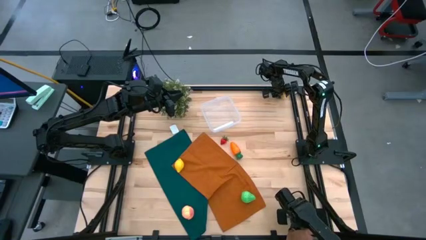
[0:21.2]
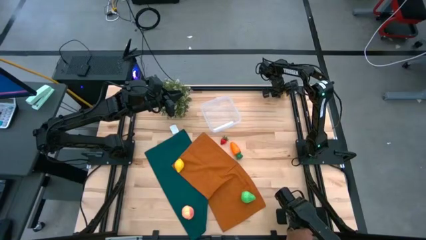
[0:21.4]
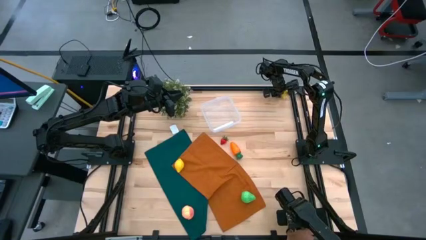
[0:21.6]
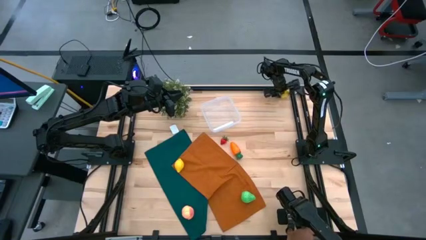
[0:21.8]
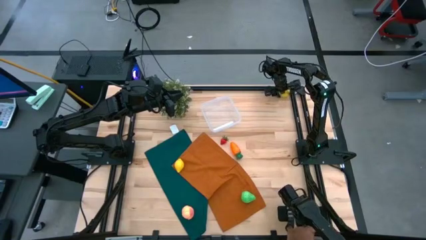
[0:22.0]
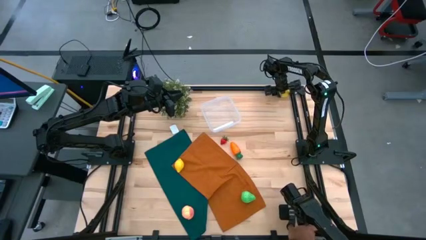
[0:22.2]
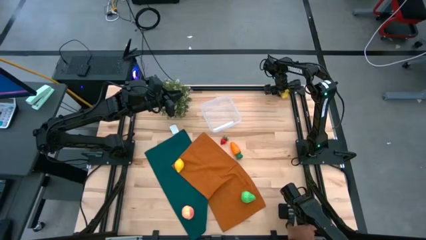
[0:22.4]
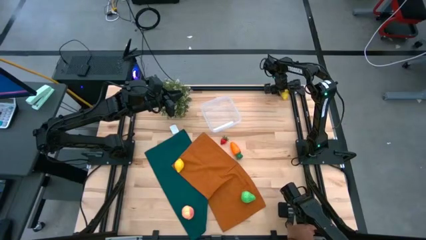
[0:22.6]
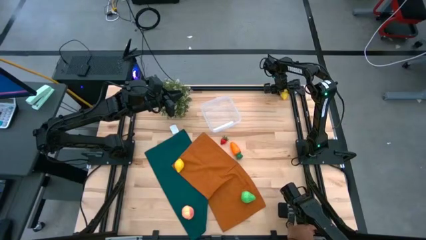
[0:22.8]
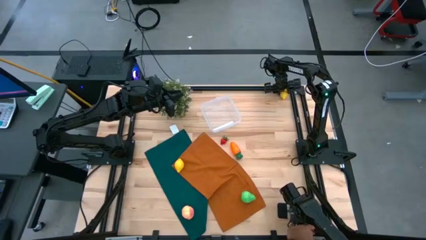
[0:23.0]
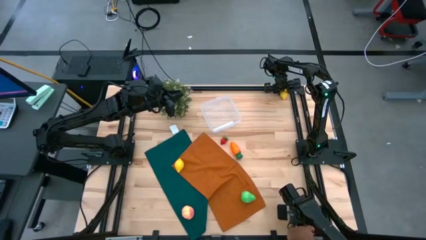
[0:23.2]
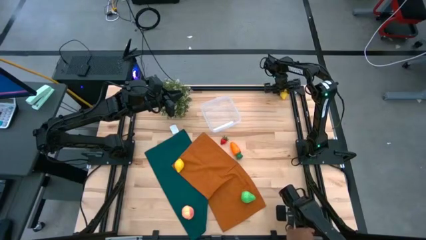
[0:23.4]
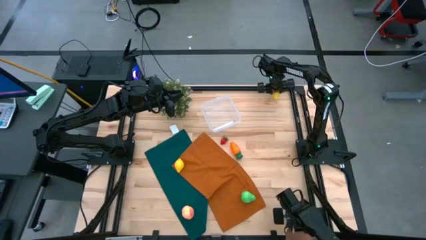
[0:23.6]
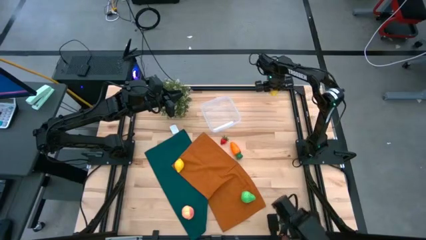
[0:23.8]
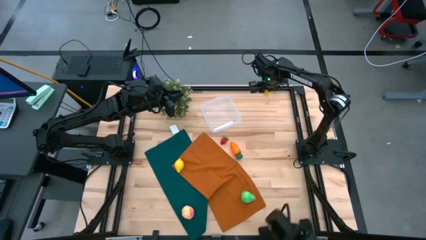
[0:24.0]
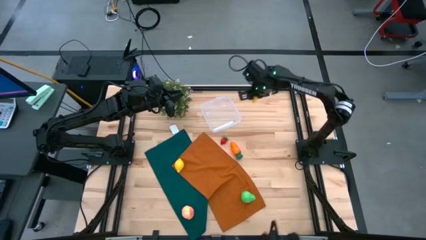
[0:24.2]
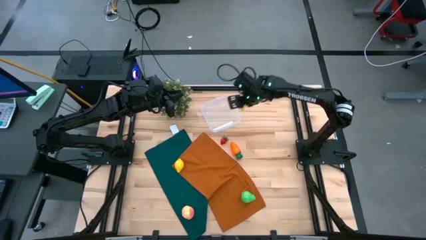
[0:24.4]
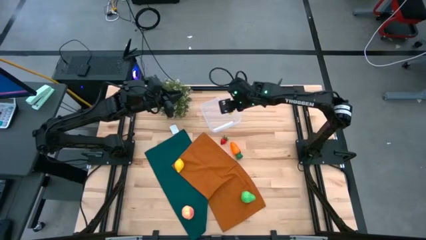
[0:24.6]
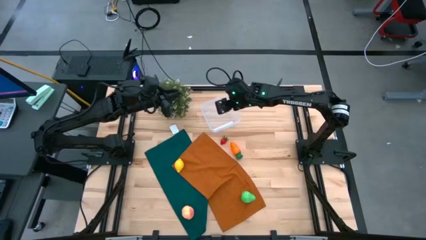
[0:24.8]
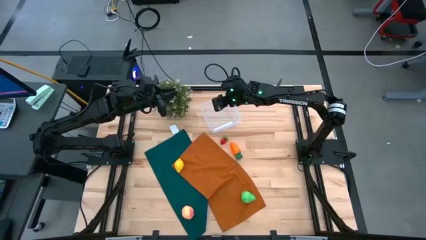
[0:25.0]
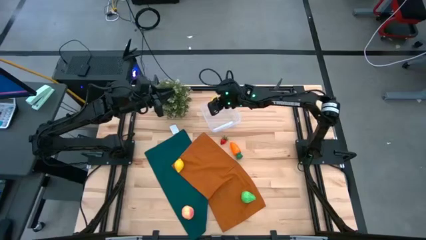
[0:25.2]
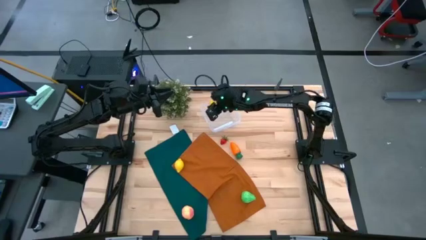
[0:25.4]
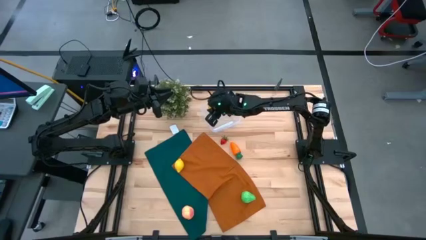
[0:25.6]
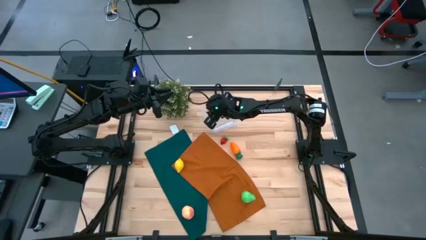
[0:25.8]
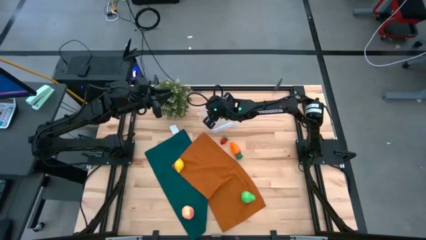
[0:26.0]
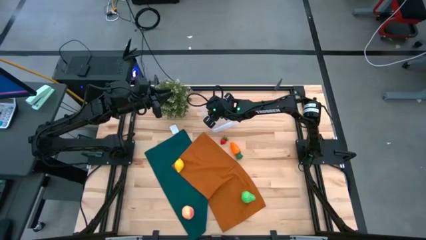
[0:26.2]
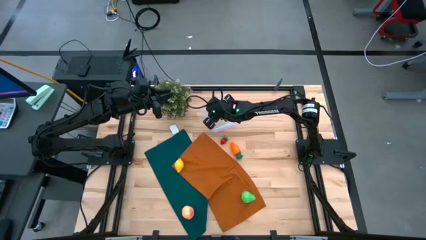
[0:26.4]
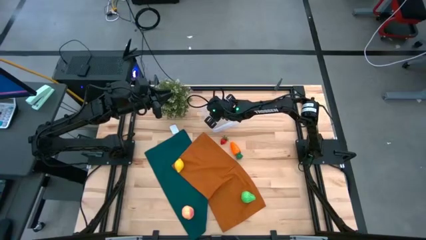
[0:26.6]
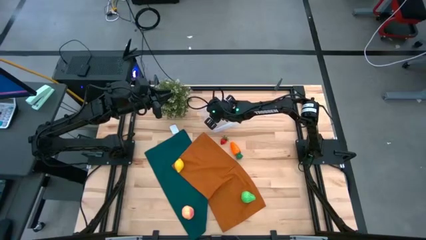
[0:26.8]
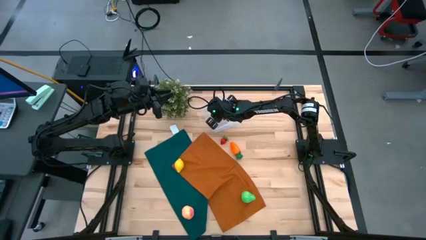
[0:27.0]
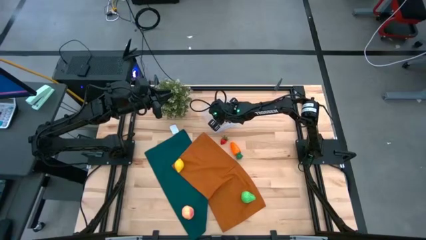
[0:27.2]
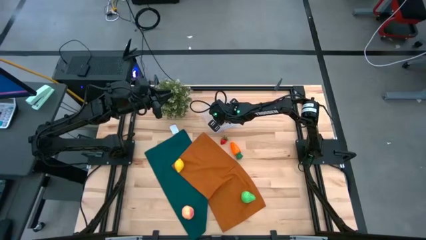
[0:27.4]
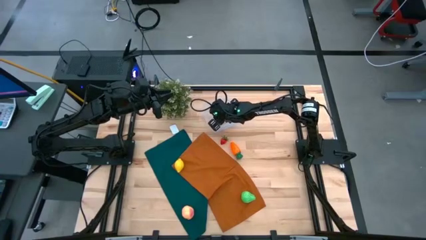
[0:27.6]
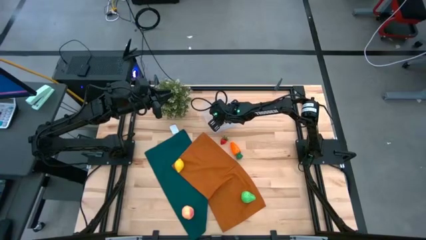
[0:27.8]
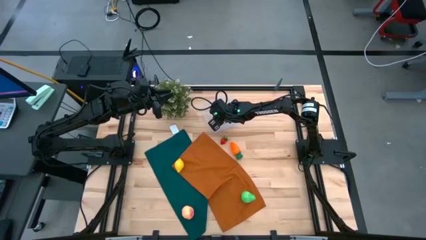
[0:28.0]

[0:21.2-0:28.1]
Task: Pick and placing Produce into tupperware
Put the top yellow lemon into the transparent bin

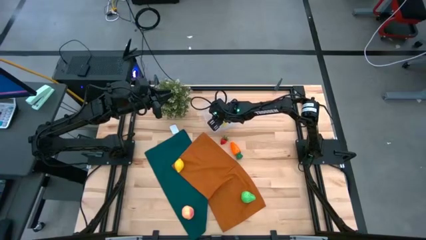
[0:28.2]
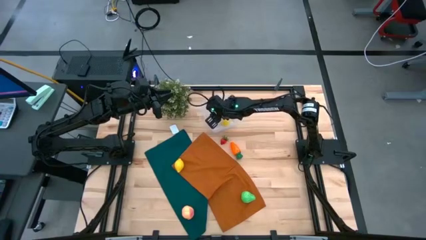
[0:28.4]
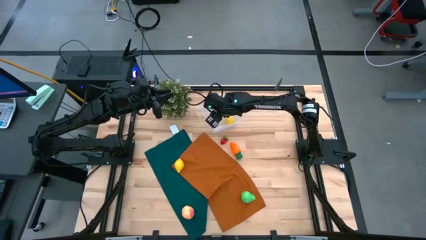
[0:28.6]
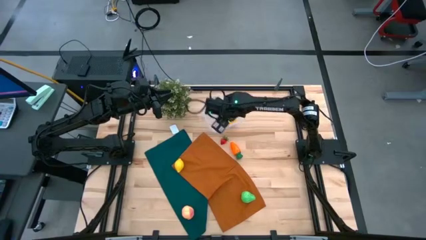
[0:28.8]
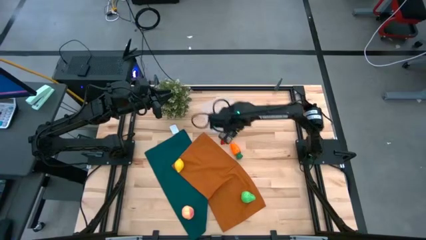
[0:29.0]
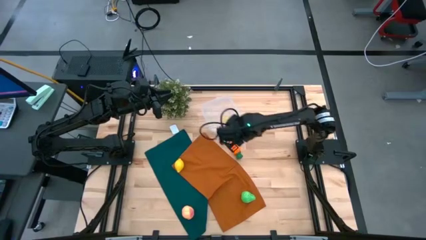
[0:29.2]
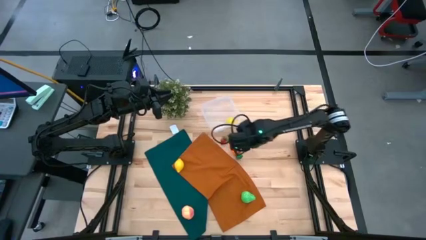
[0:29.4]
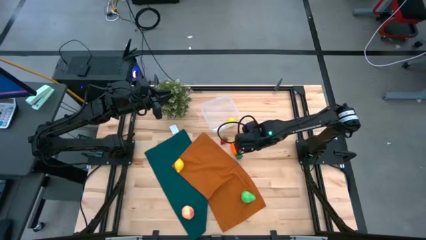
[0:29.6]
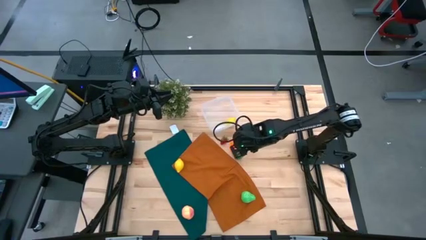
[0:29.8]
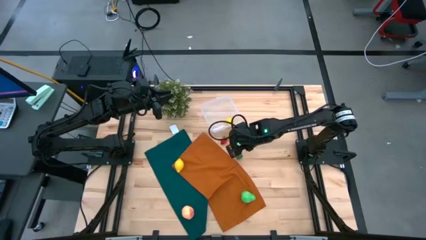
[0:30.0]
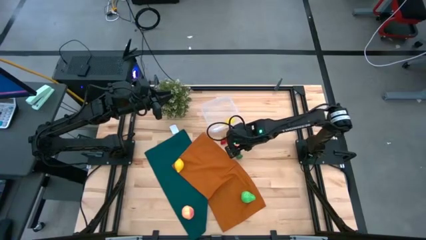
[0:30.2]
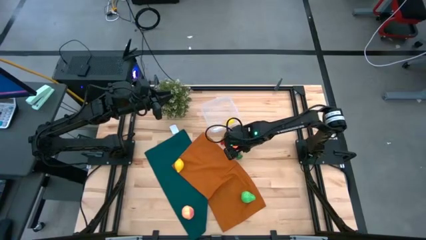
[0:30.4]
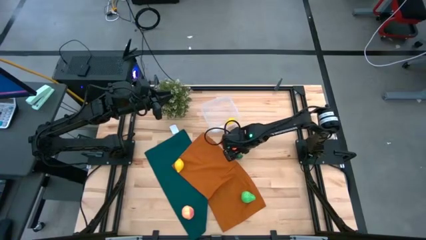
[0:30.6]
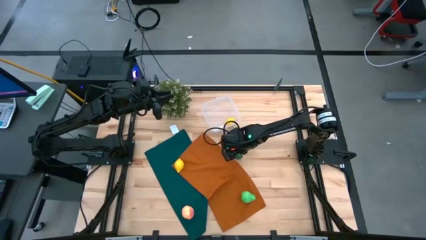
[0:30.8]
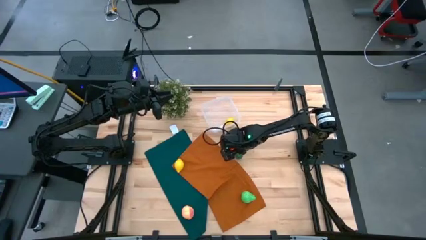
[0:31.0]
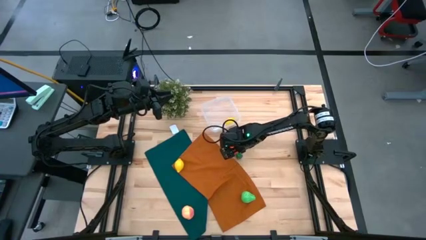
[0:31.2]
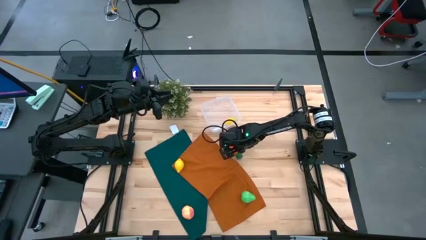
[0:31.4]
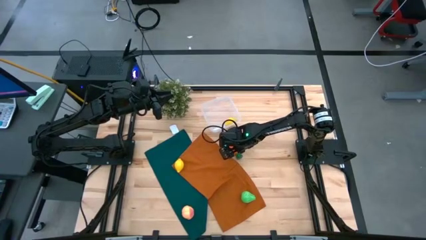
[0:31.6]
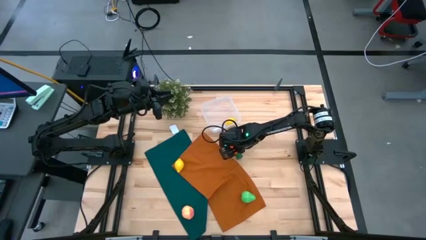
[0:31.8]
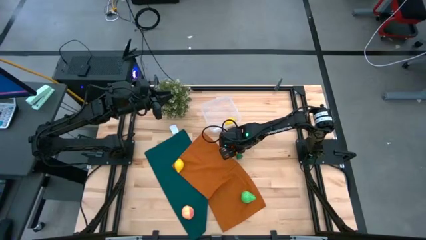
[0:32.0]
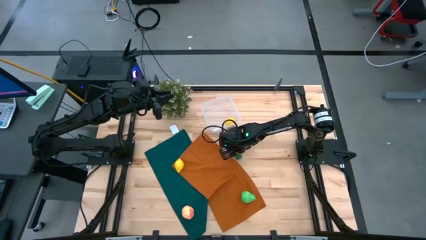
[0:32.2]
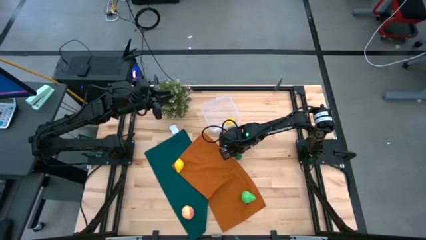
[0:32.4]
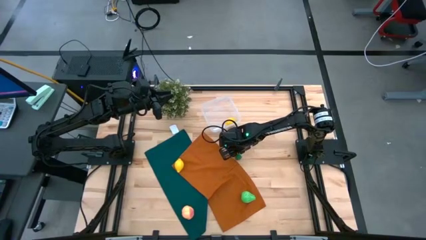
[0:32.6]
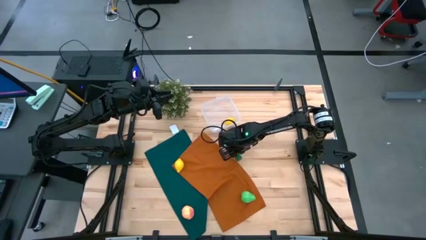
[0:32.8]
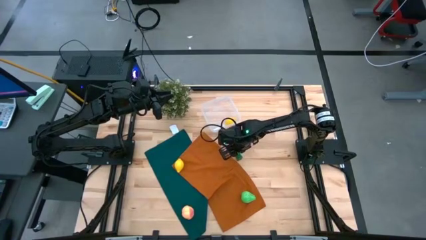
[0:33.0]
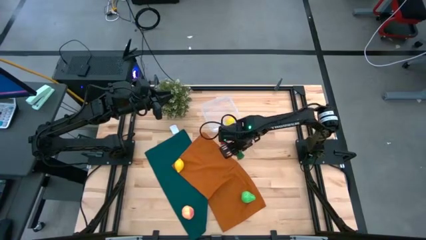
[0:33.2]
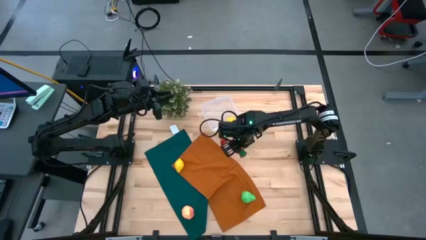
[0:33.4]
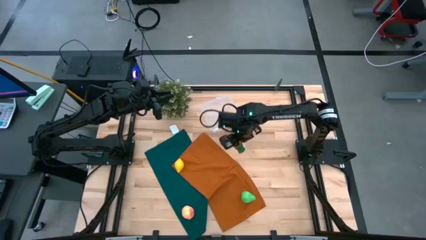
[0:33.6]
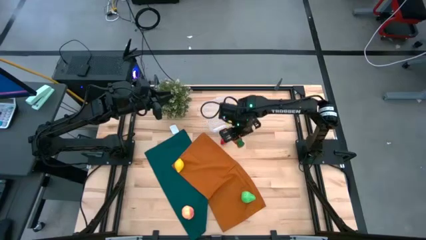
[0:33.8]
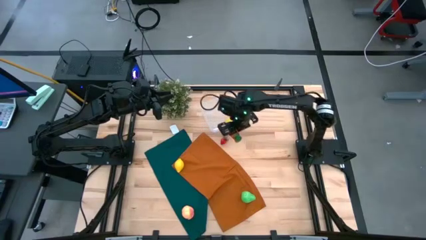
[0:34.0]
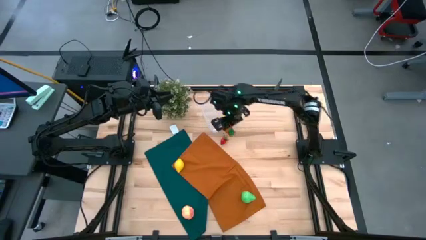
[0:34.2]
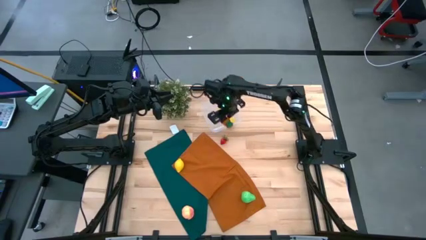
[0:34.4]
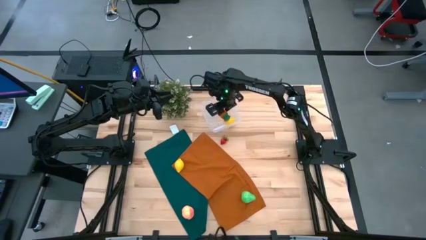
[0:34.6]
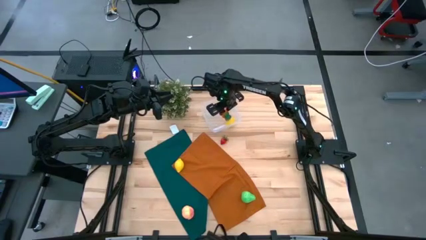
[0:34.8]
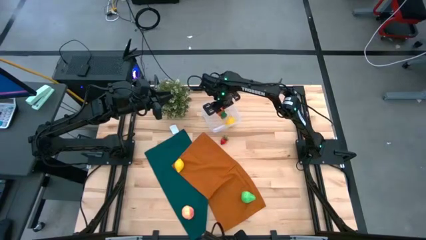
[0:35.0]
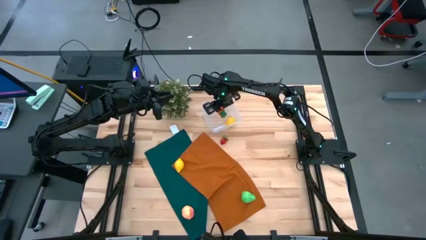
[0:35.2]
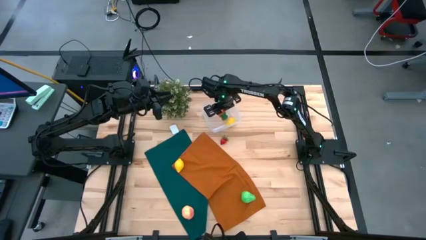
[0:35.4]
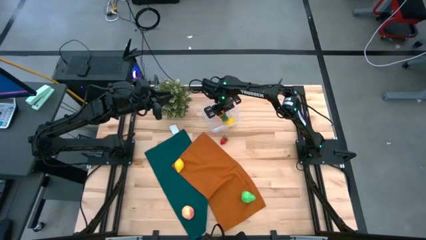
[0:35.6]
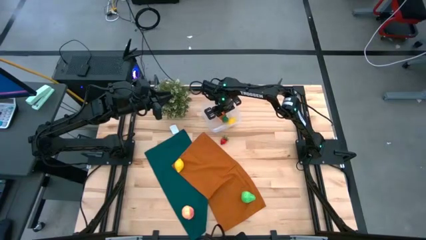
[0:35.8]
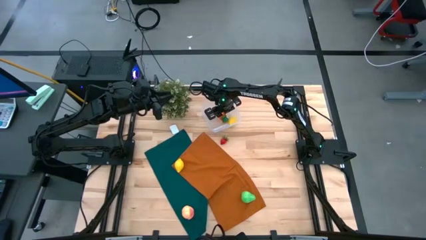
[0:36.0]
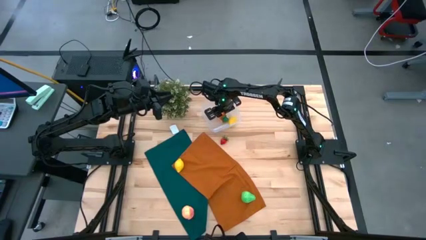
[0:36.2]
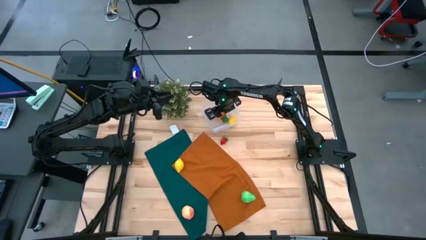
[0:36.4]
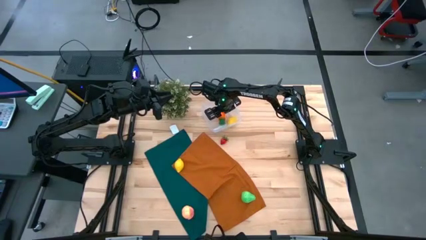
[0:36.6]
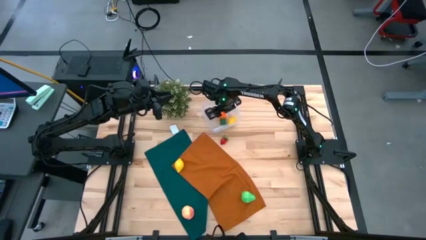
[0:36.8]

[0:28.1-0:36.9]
Put the orange carrot into the transparent bin
